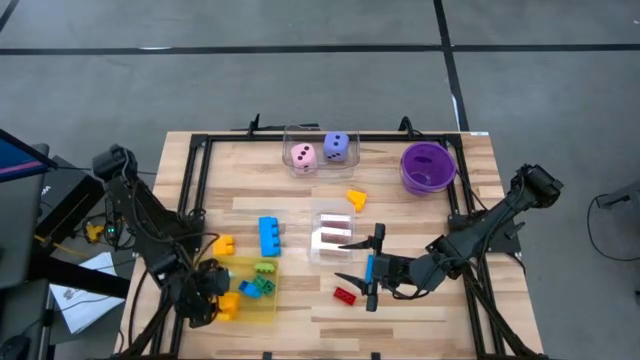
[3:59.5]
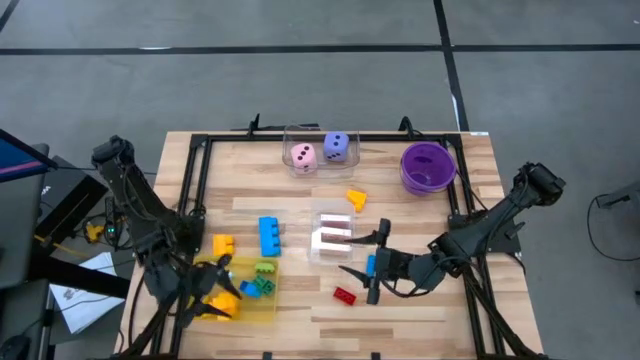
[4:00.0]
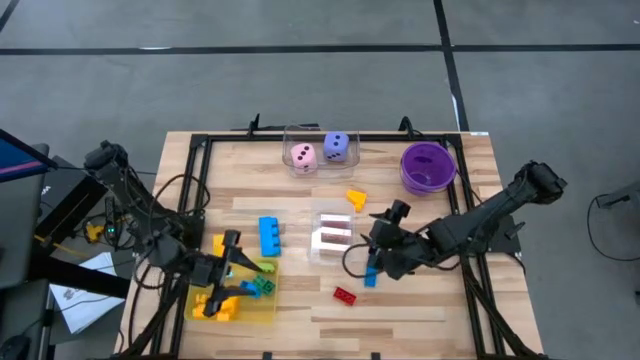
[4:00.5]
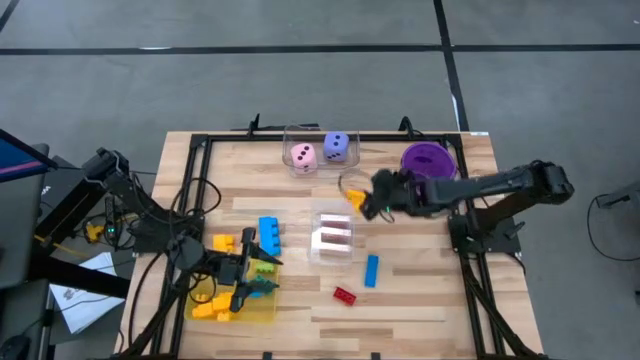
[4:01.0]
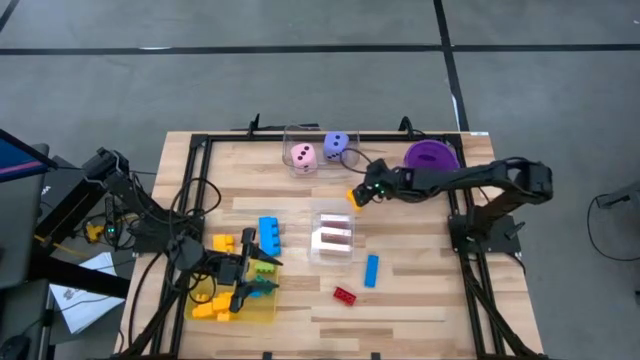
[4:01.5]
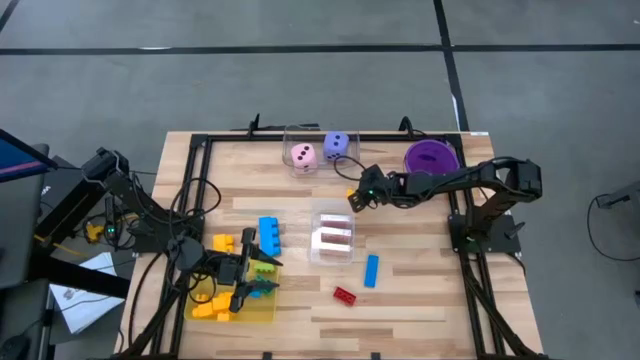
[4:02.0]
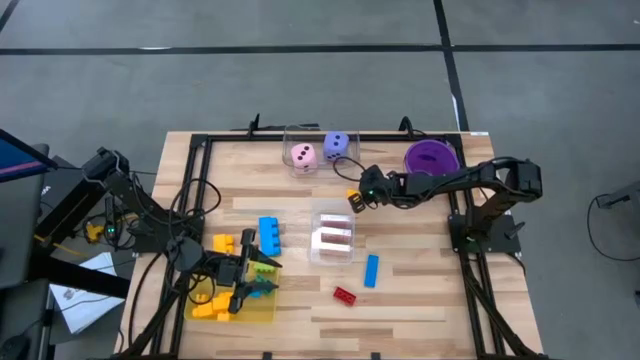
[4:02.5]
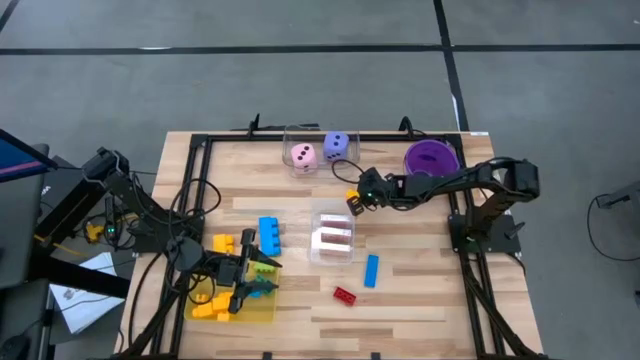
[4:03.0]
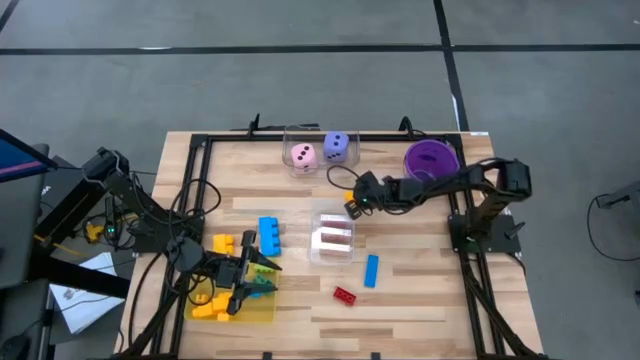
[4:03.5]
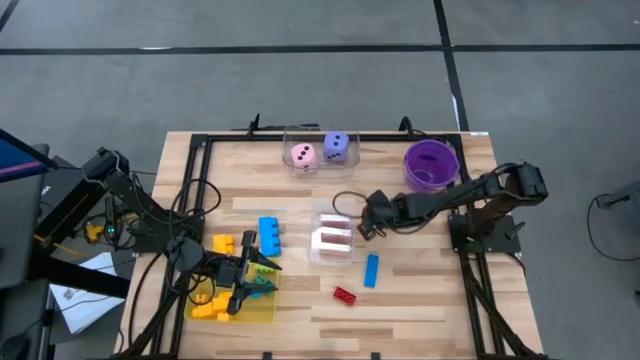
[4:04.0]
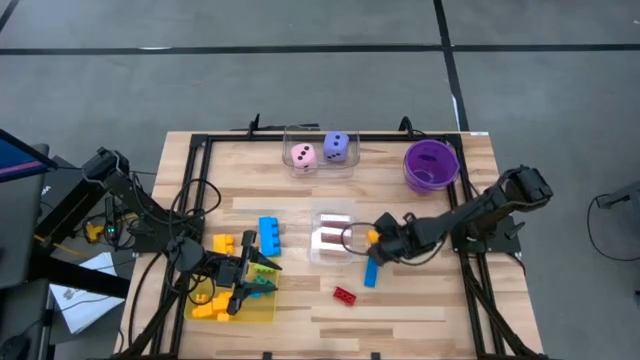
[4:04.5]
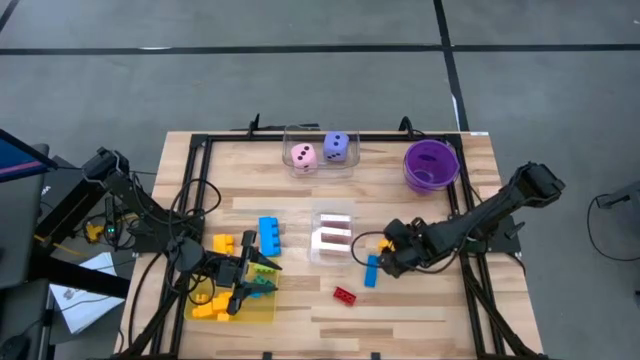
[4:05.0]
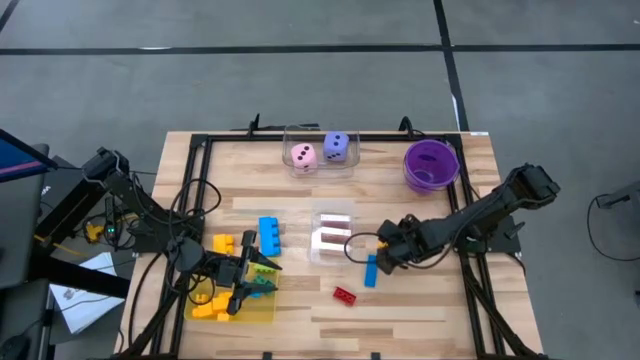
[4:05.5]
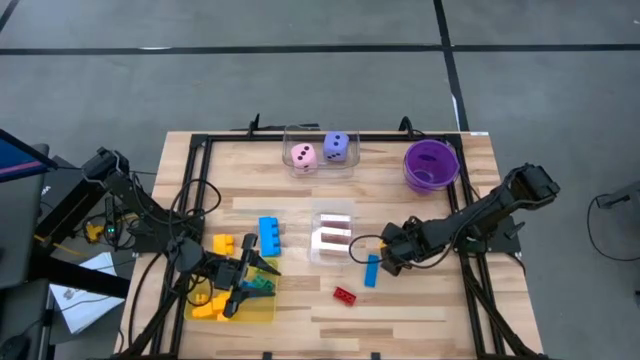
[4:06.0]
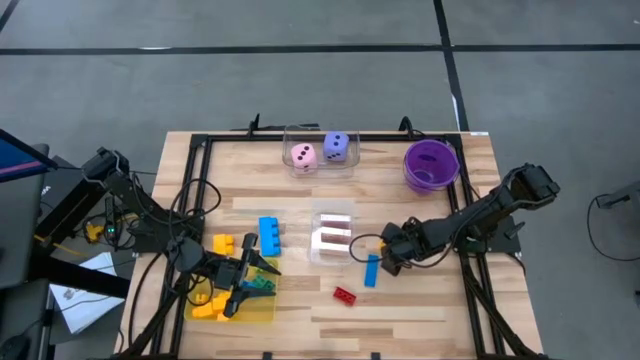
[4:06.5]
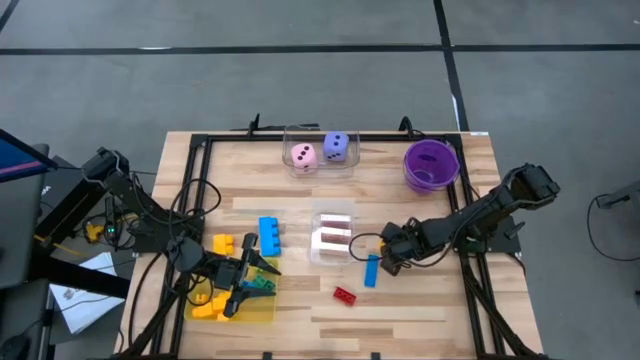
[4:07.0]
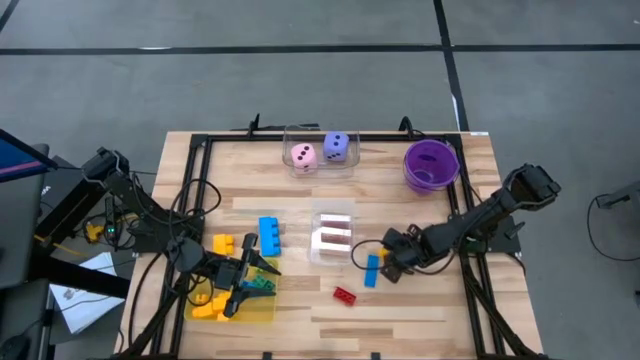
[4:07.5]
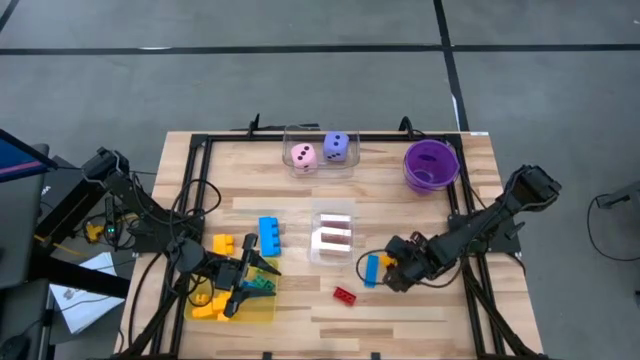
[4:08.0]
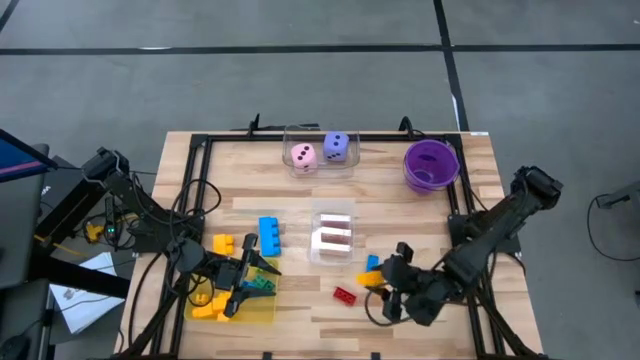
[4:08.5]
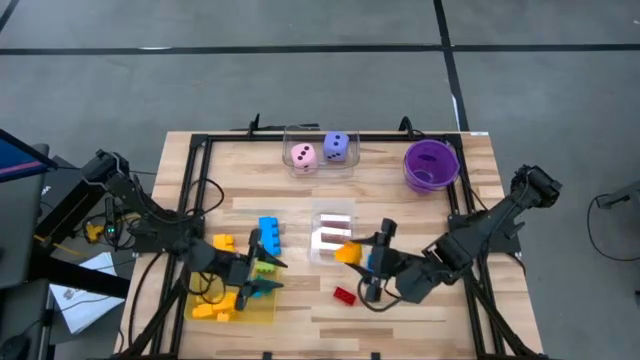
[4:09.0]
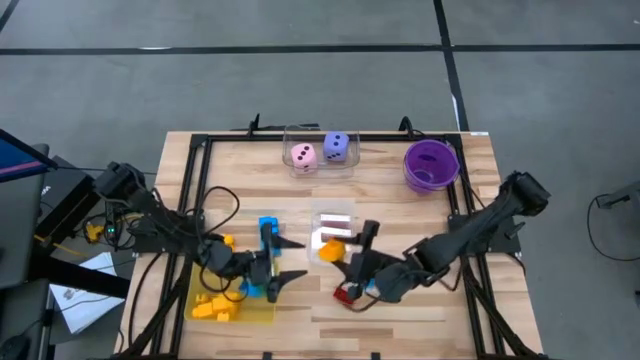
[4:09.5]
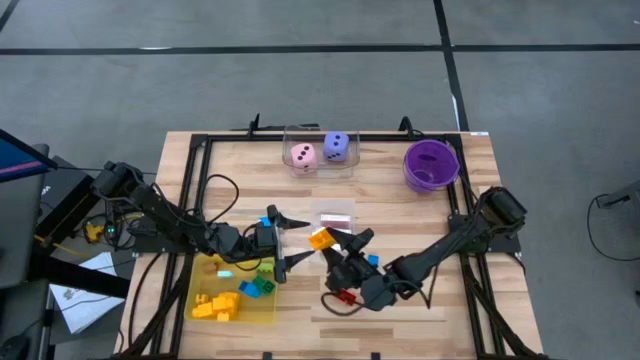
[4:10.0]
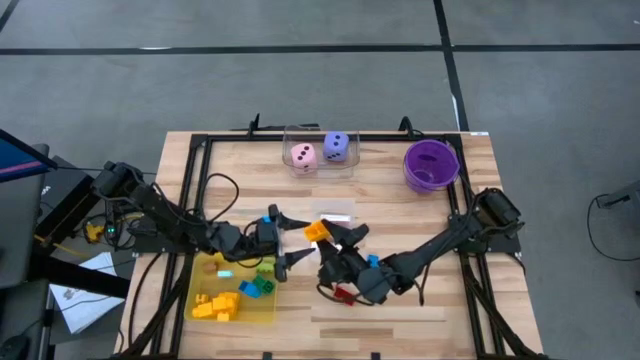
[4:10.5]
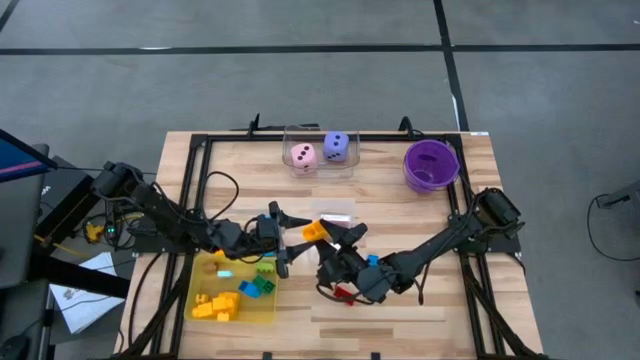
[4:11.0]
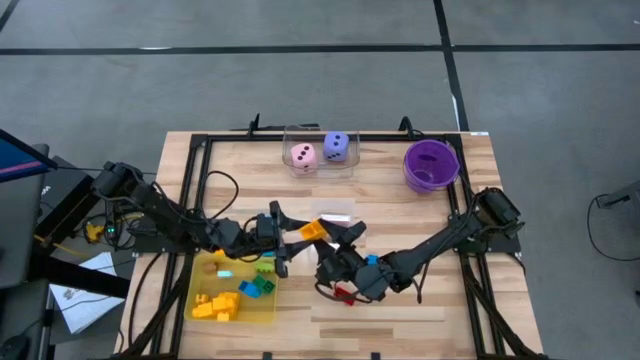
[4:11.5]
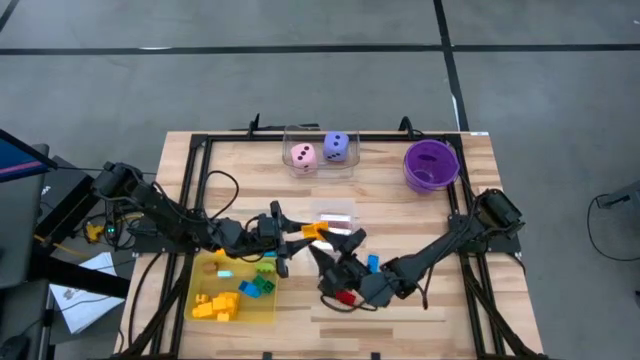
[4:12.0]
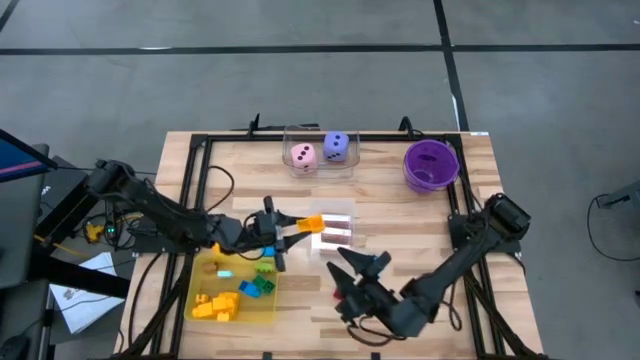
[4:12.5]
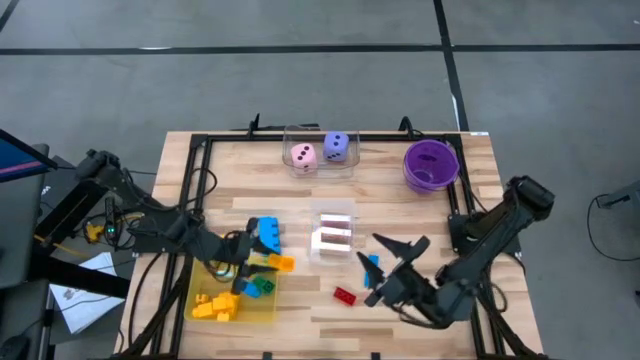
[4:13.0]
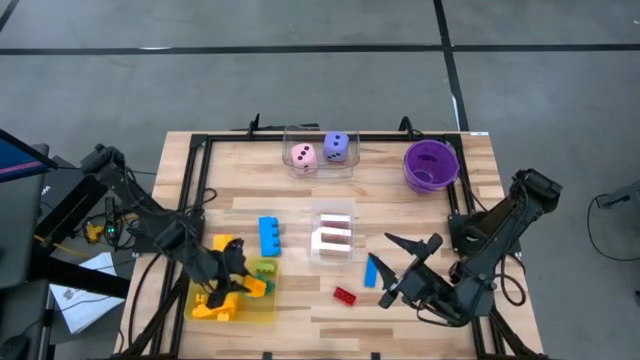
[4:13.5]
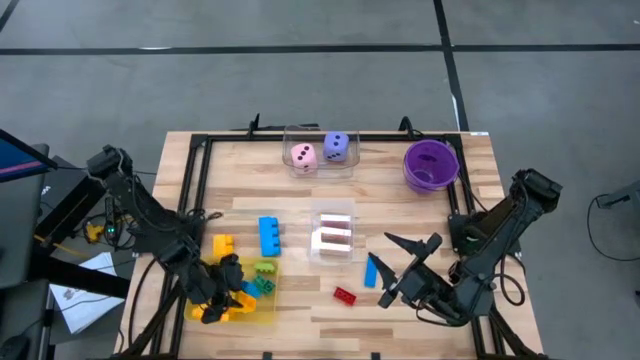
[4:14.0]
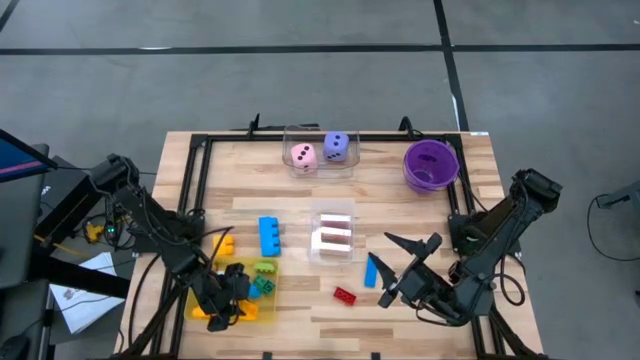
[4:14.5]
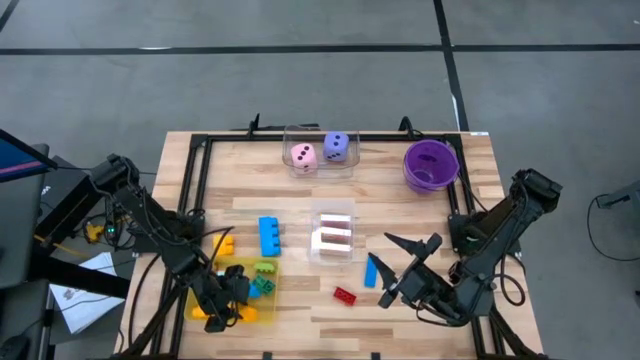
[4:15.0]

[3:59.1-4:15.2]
Task: Pick & Place Toys
Put the yellow game piece into the yellow bin

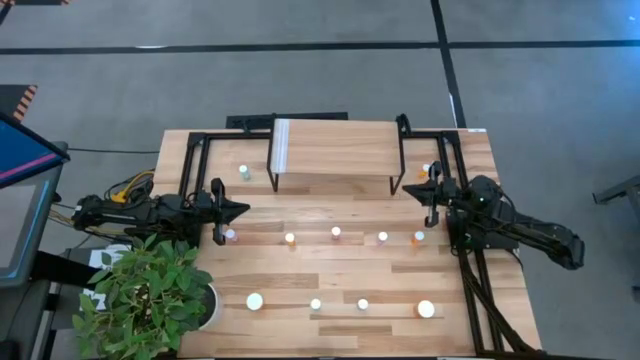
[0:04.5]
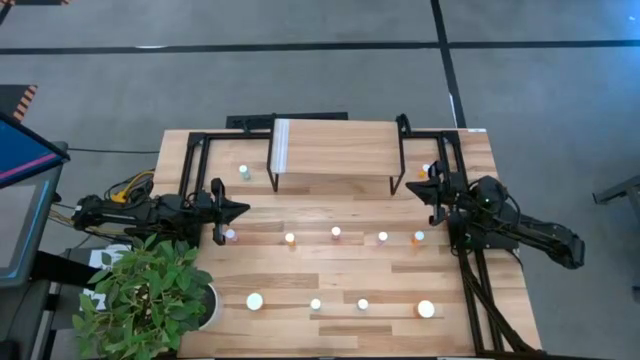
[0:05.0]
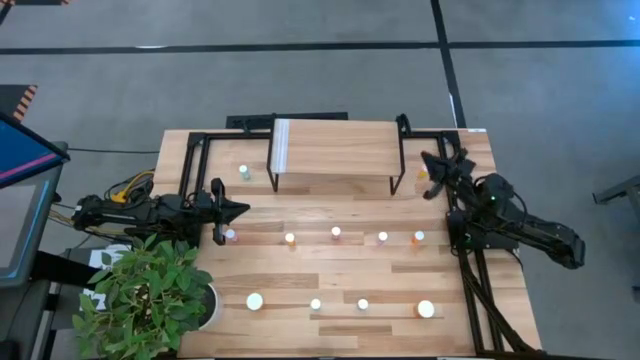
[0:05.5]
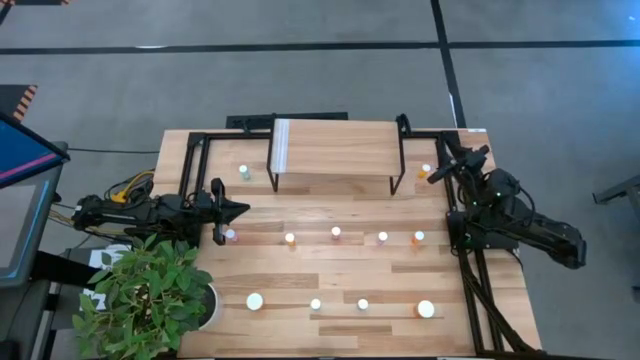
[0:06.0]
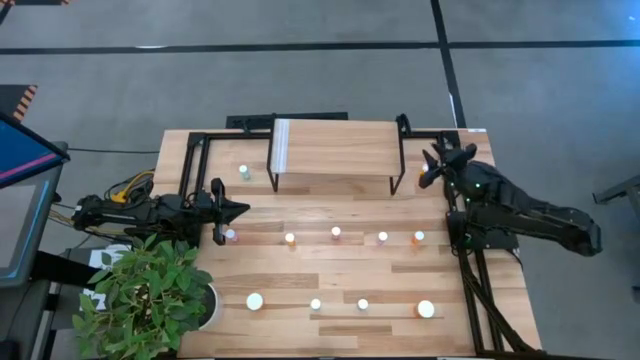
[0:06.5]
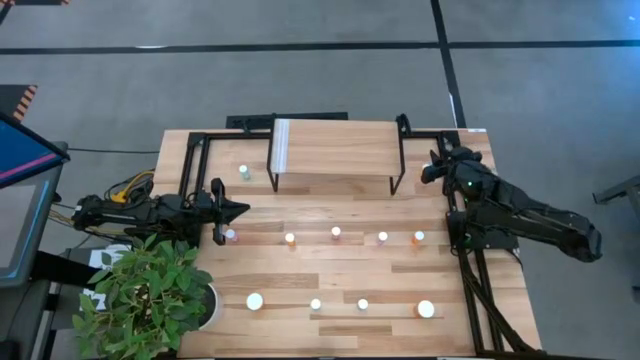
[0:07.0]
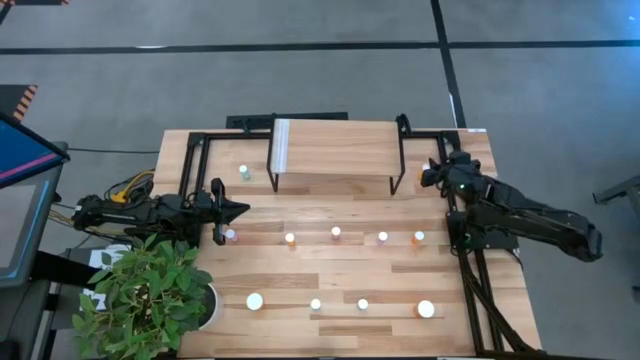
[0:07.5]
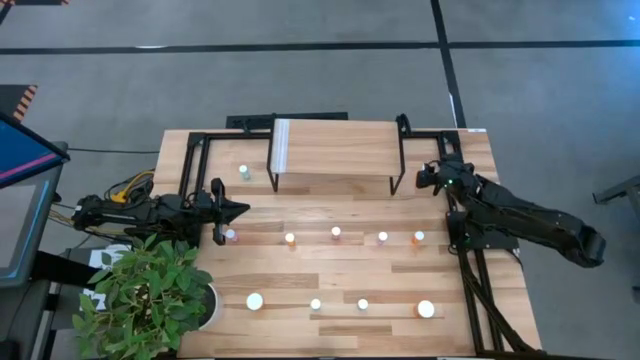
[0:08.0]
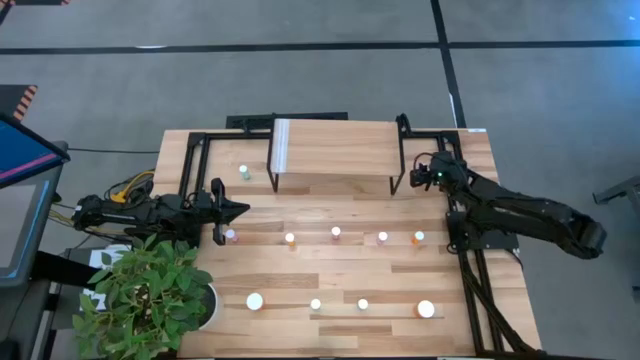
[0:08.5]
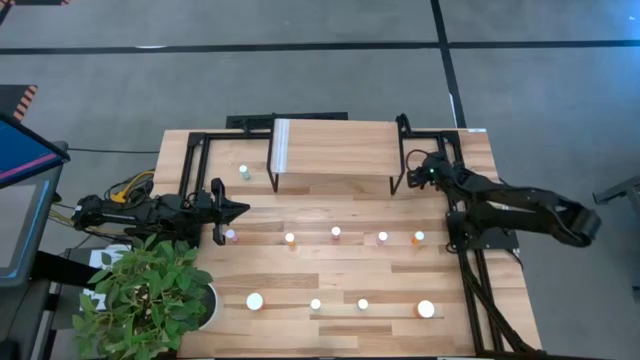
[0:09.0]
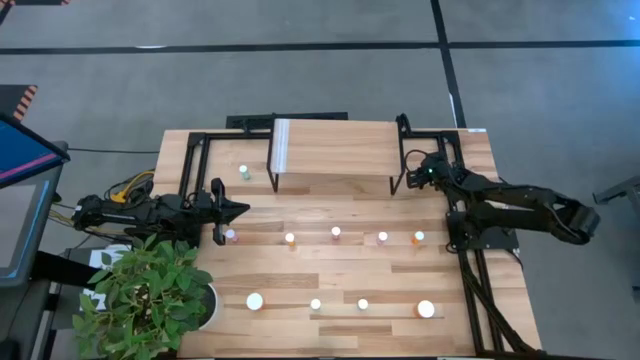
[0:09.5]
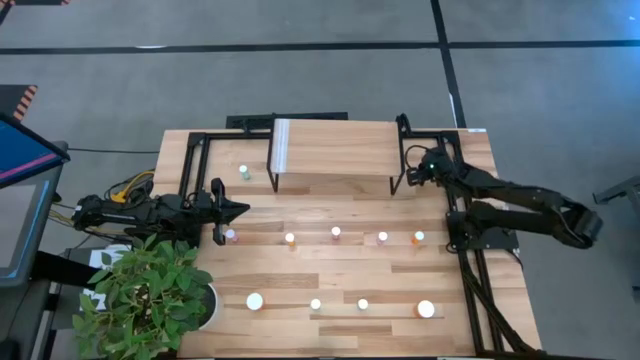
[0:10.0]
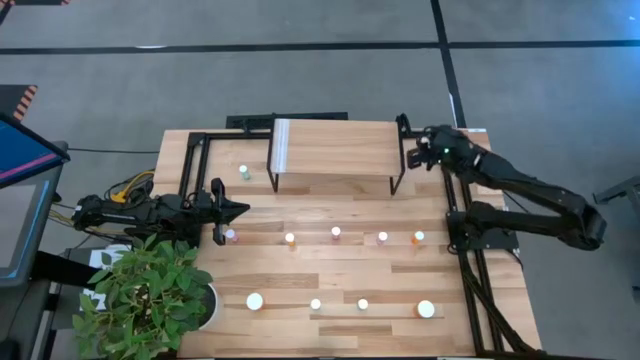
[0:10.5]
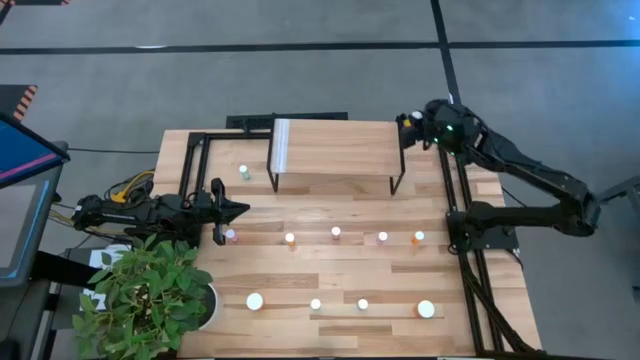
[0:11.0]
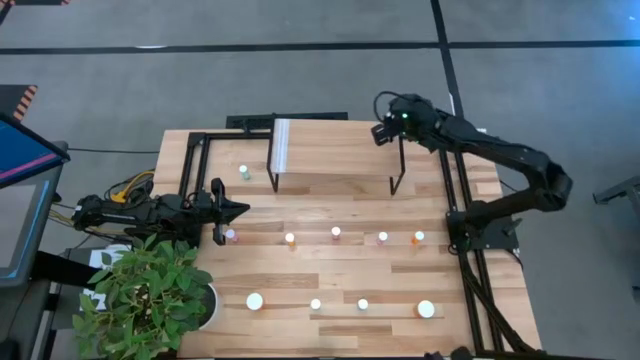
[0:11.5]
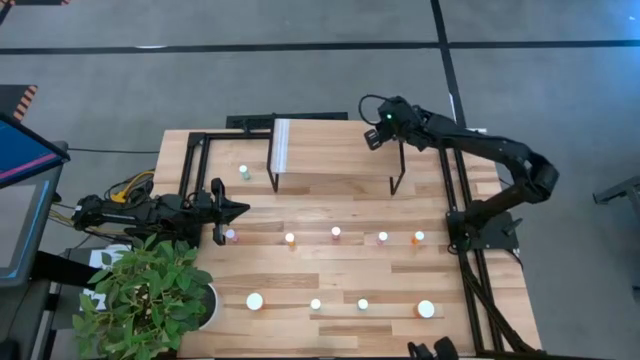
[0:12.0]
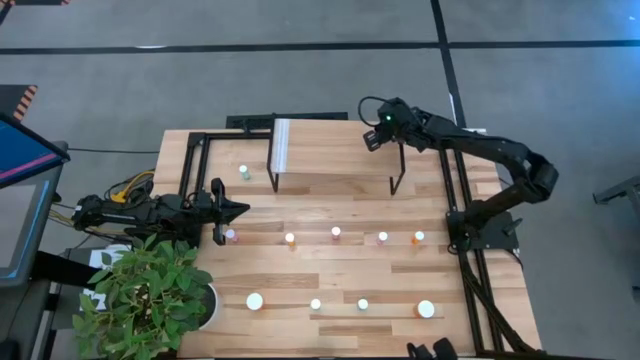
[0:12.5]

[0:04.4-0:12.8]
Task: Pick and place medicine bottles onto shelf by color
Put the top right small orange pill bottle on the shelf
